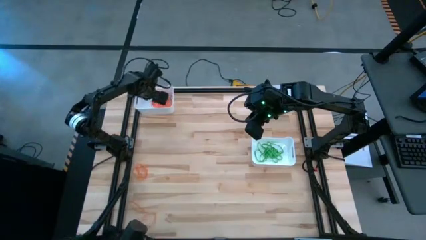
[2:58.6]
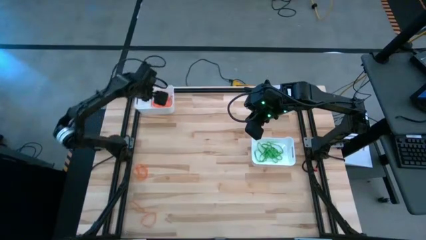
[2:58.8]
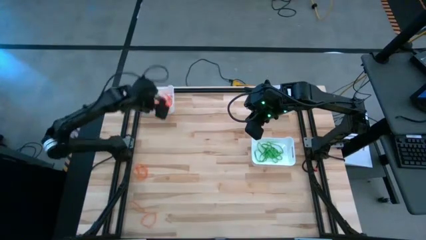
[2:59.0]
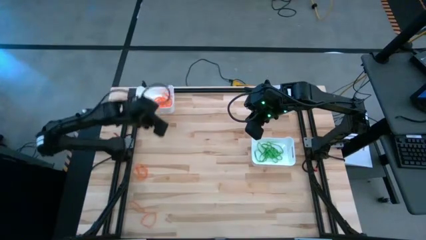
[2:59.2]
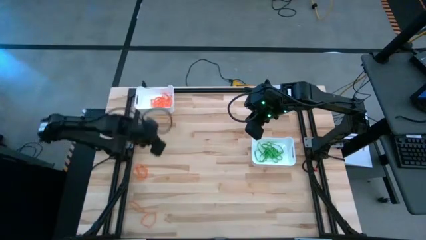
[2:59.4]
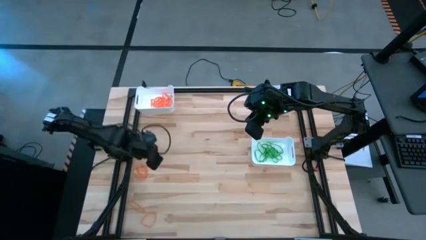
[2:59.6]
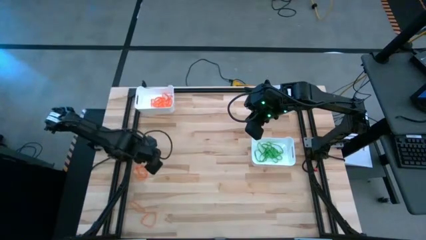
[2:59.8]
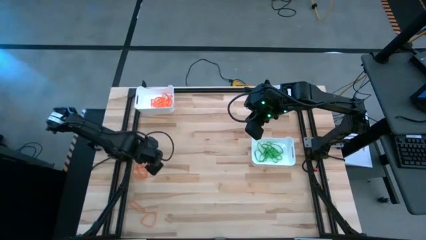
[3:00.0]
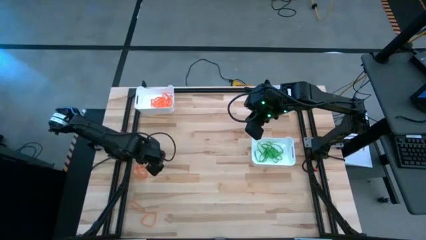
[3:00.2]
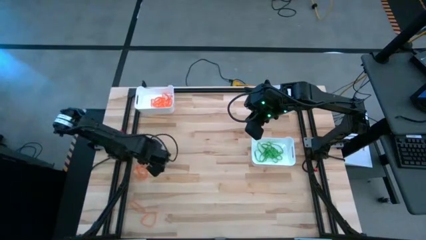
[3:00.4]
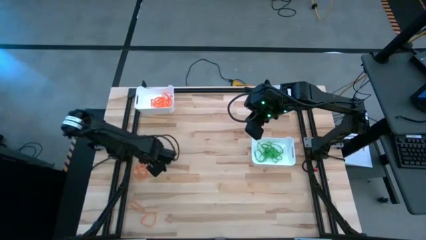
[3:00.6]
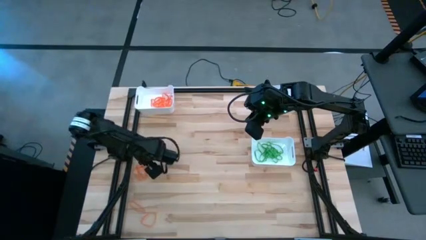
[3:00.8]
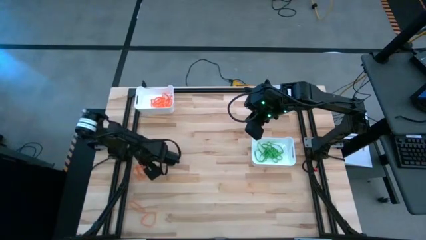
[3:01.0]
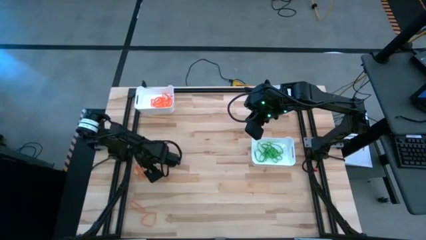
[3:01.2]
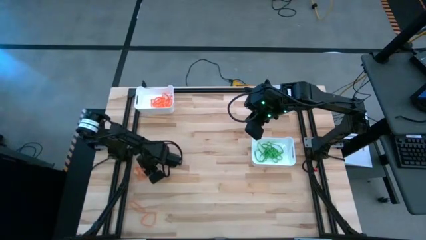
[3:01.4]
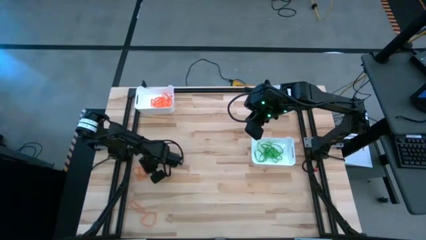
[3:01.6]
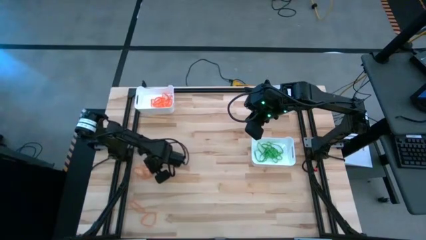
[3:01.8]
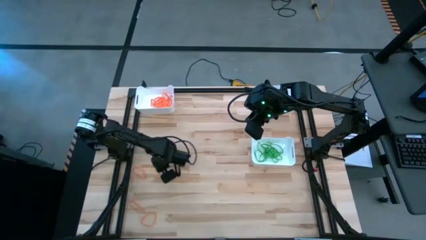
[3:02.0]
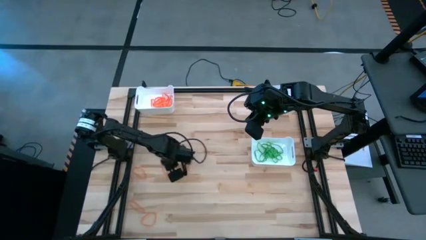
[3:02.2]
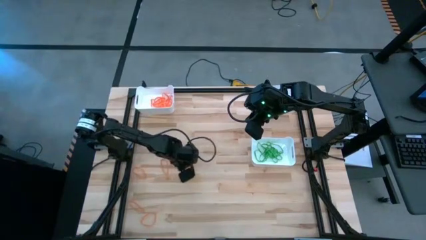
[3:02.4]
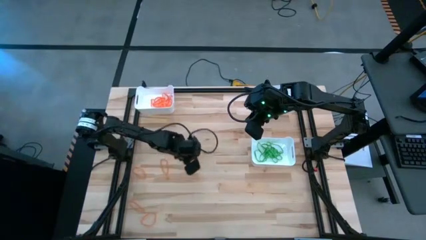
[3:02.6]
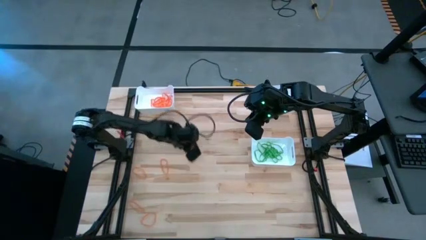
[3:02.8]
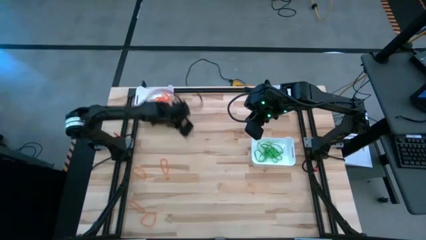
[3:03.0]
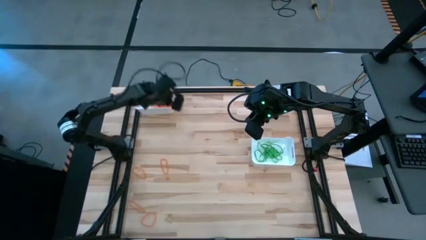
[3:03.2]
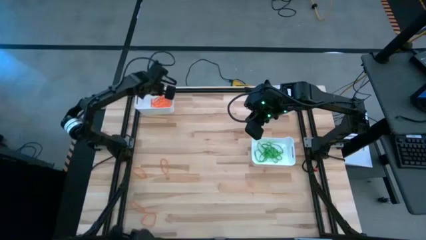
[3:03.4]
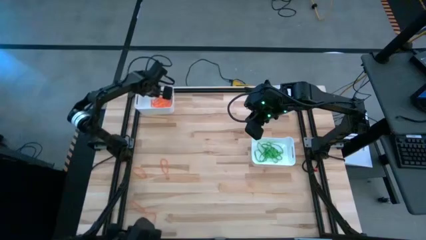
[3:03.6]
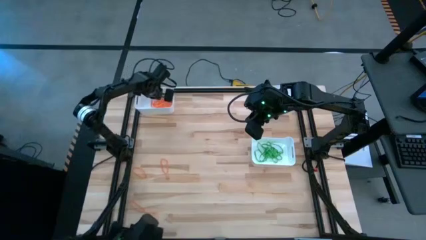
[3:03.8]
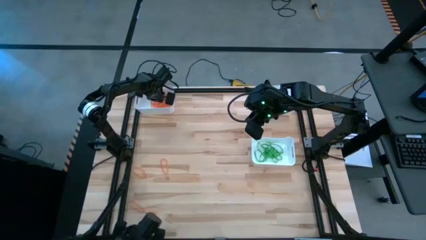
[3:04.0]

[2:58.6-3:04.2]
Task: Sort rubber bands into baskets
Put the orange rubber band into the top left white bin

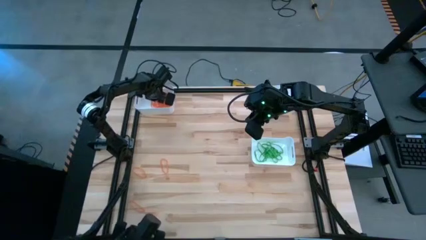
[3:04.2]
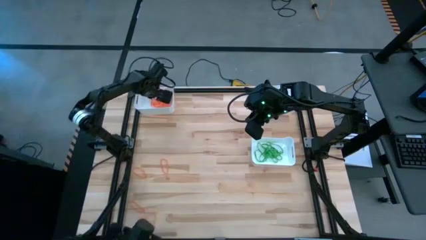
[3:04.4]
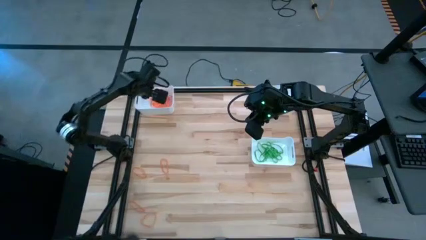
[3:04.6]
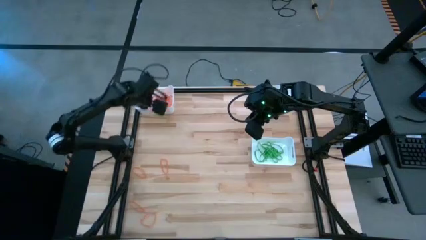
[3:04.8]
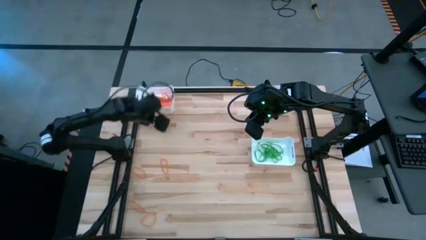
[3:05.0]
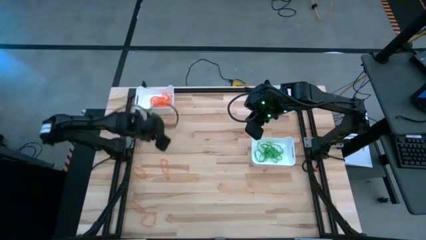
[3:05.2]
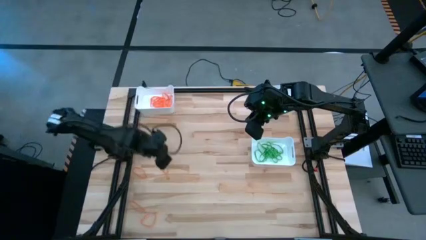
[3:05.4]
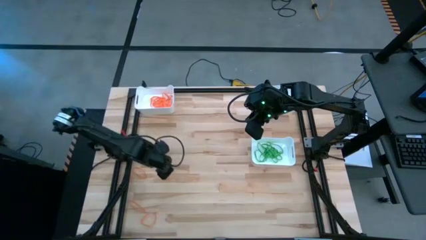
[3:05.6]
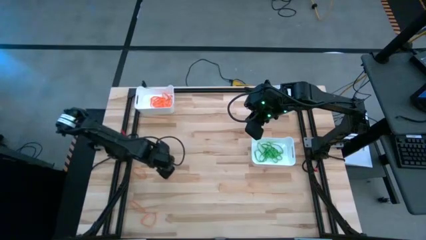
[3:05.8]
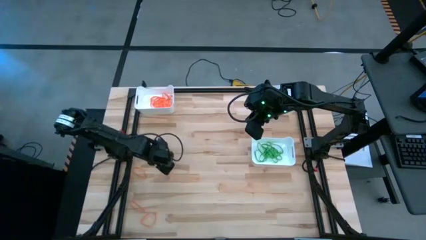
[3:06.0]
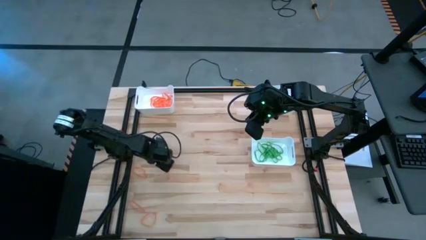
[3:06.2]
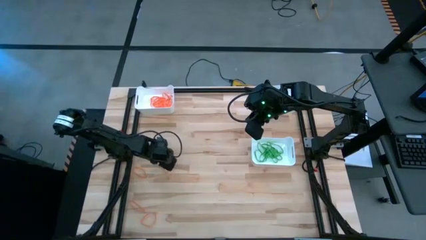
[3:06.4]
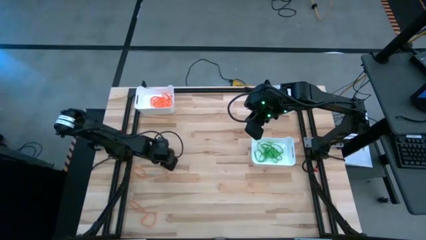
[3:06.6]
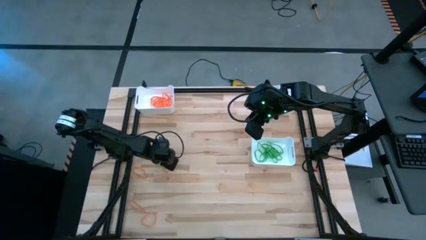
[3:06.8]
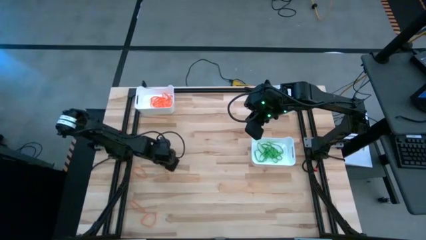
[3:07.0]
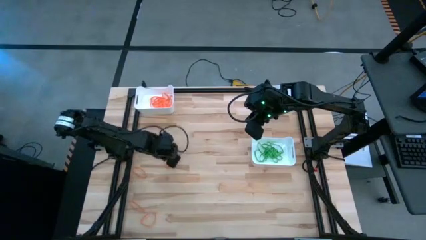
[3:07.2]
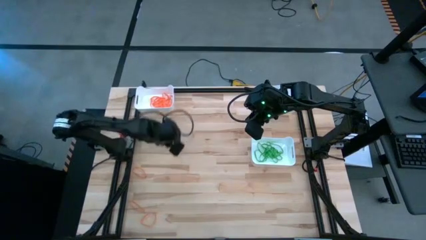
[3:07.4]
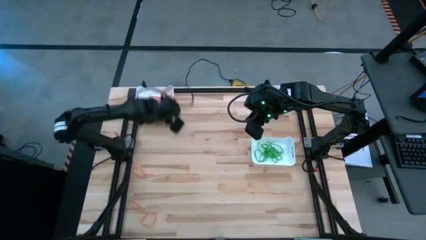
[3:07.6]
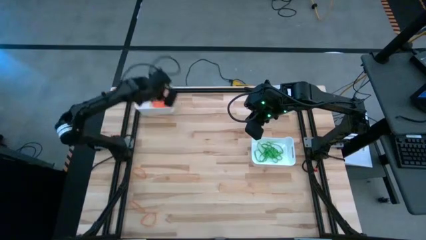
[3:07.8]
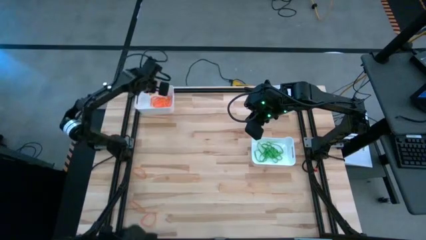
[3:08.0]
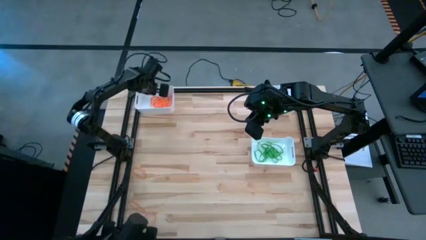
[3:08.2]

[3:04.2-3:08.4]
Put the orange rubber band into the top left white bin

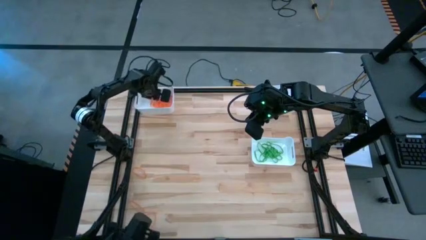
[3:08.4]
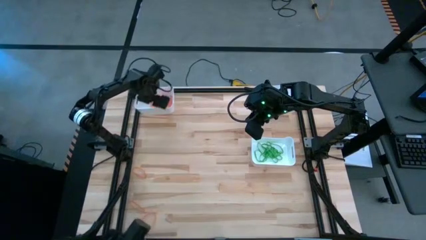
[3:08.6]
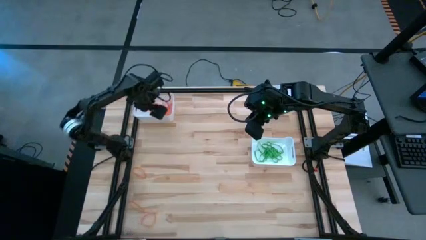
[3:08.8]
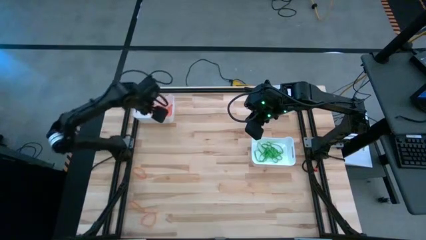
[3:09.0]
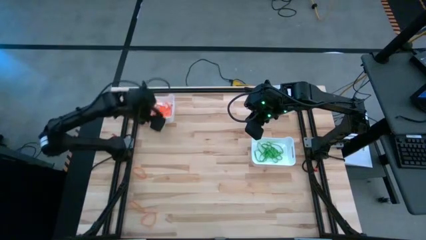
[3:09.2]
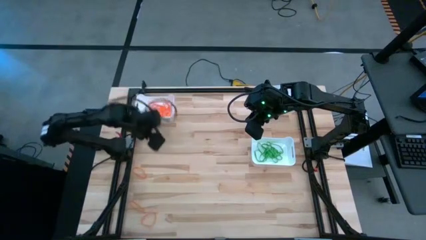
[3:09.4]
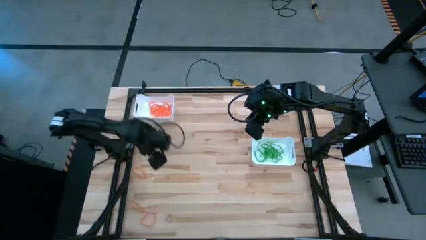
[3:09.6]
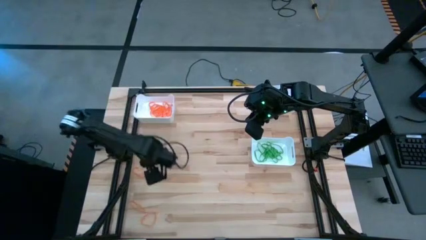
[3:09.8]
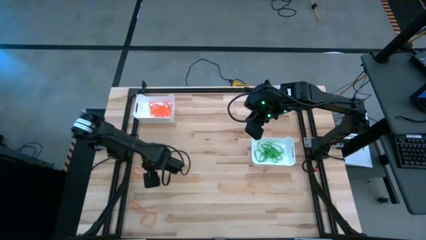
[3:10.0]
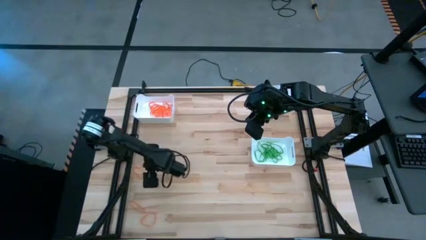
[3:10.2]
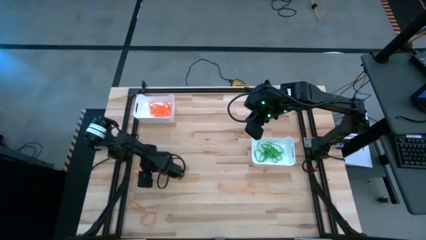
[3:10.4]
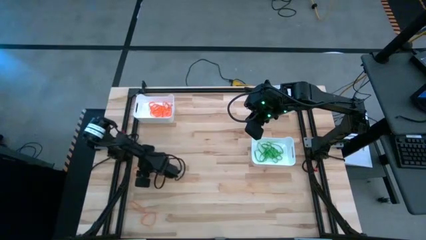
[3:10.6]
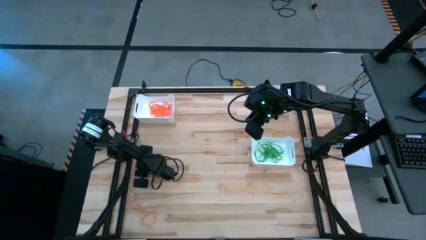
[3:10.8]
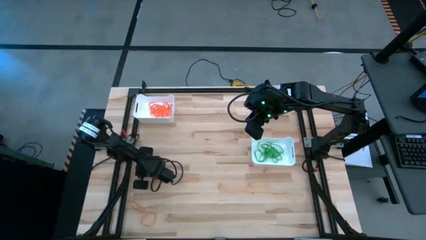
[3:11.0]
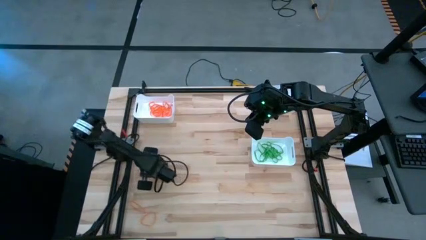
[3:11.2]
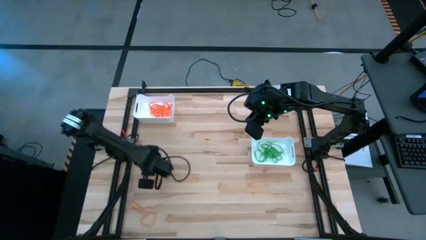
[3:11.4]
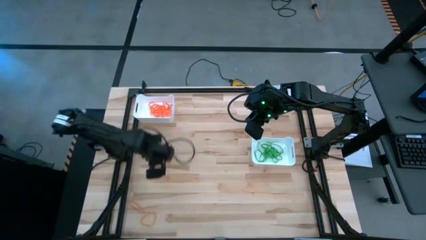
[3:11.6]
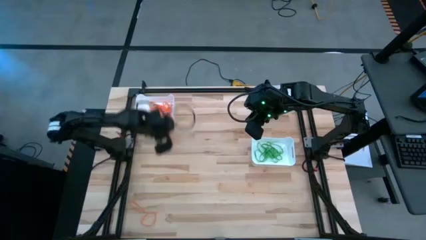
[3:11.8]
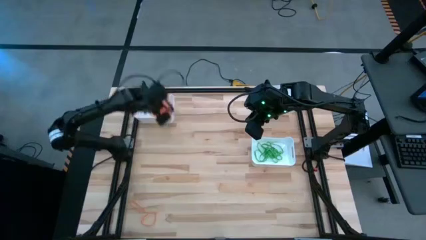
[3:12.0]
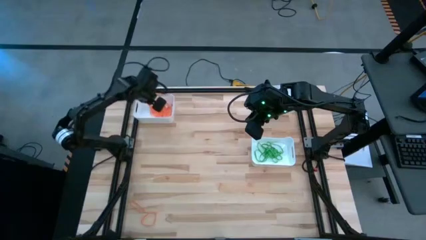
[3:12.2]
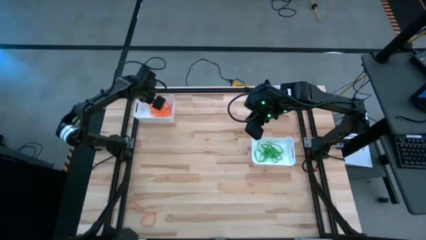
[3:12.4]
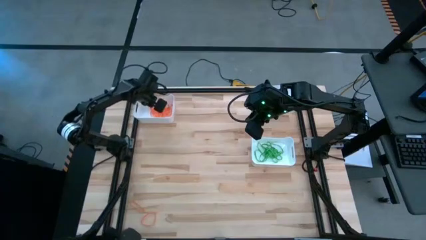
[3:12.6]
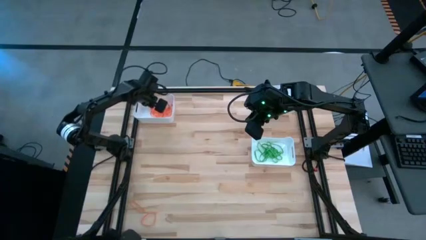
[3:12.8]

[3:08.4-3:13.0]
Put the orange rubber band into the top left white bin

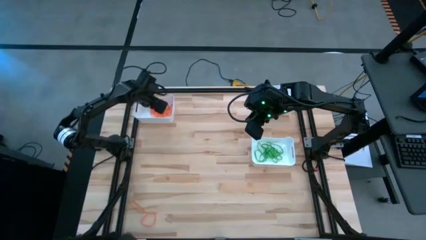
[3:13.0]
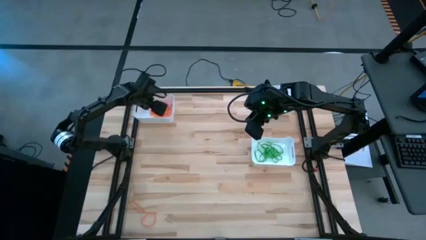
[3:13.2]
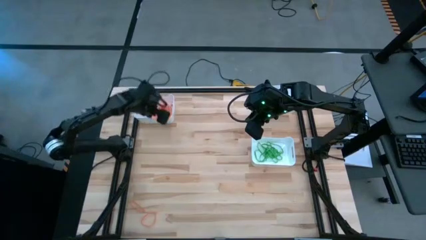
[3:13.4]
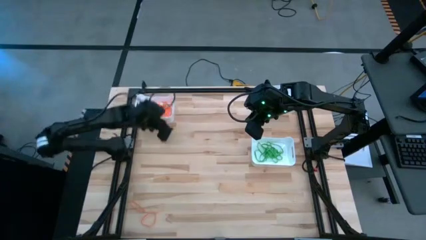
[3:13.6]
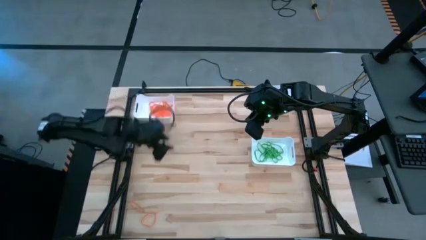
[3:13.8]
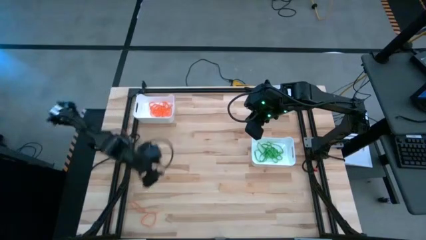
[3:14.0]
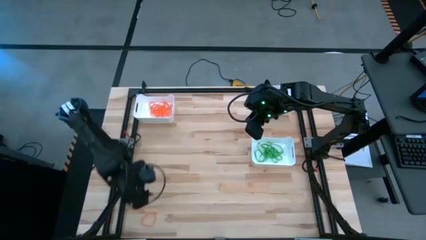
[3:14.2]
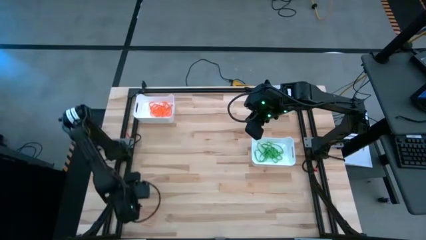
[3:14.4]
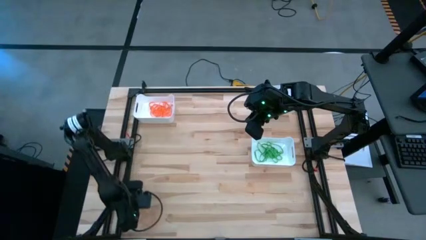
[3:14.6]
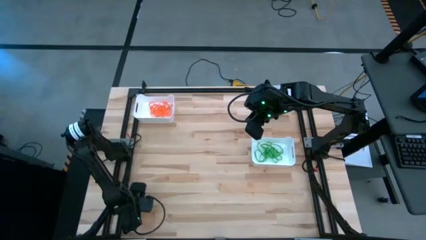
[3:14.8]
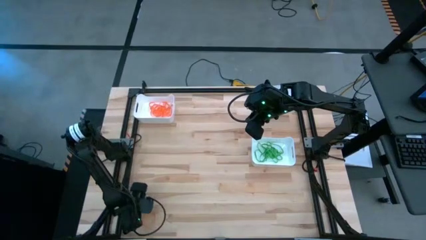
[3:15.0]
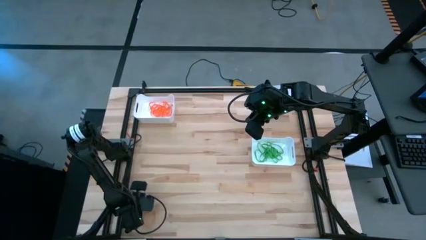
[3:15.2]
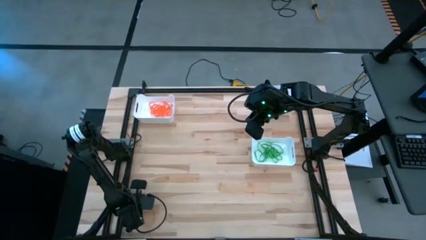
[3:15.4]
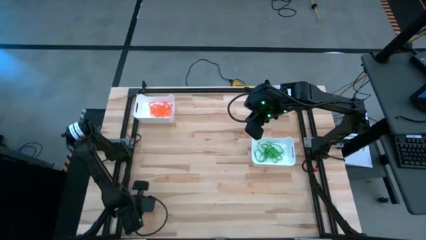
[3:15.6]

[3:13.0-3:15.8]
Put the orange rubber band into the top left white bin
